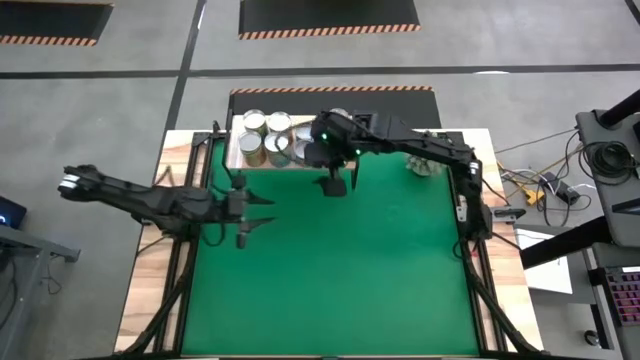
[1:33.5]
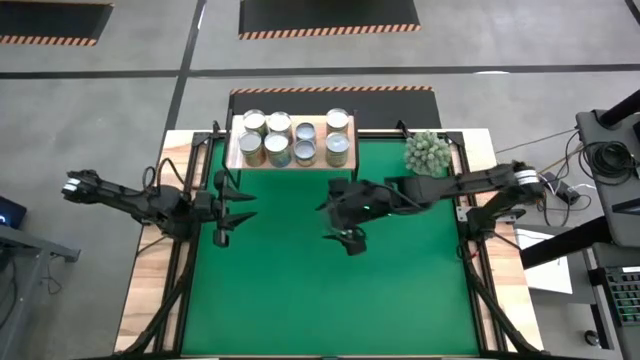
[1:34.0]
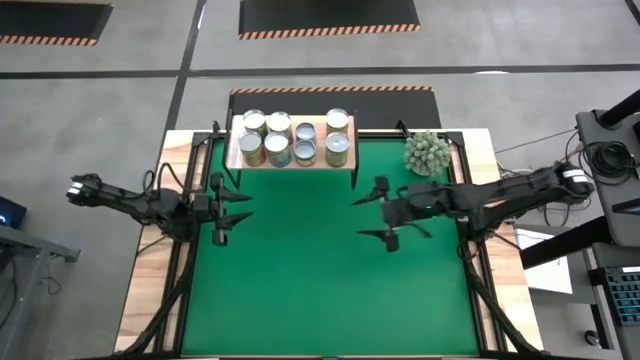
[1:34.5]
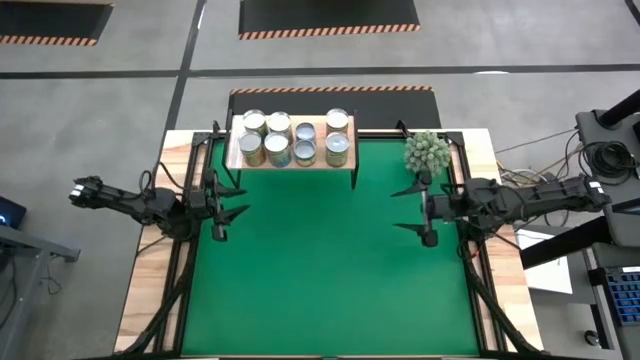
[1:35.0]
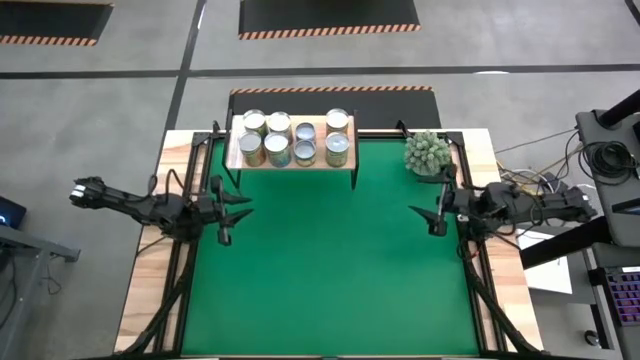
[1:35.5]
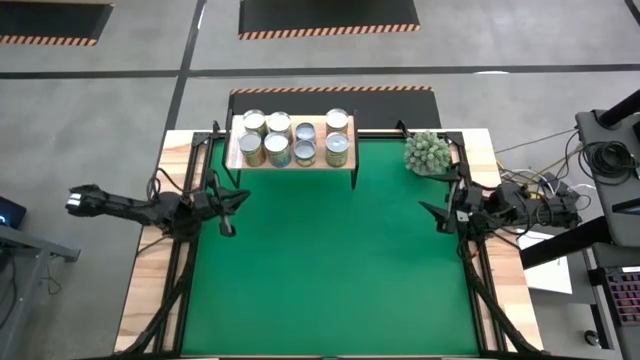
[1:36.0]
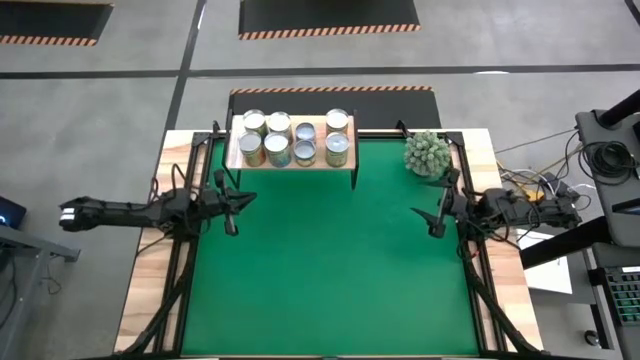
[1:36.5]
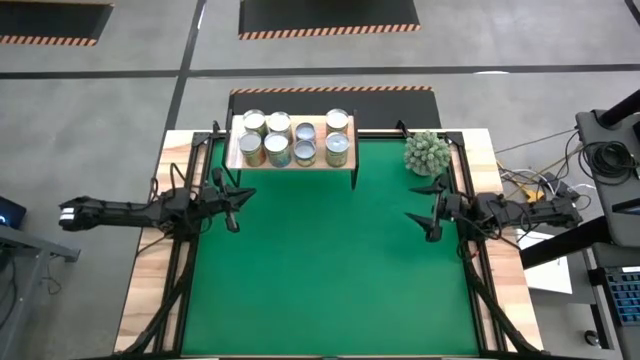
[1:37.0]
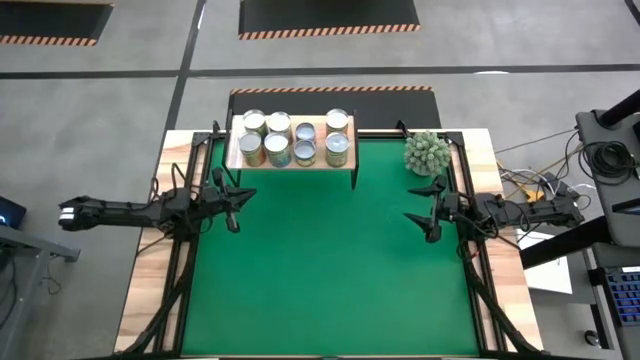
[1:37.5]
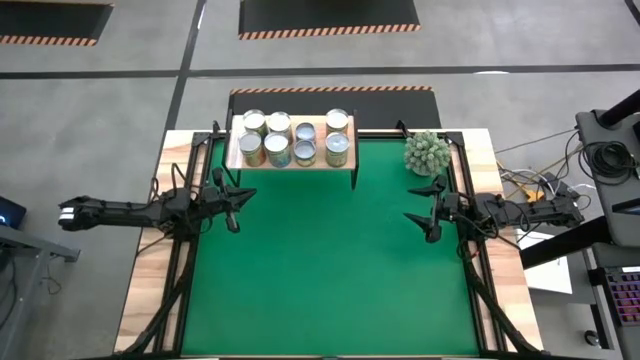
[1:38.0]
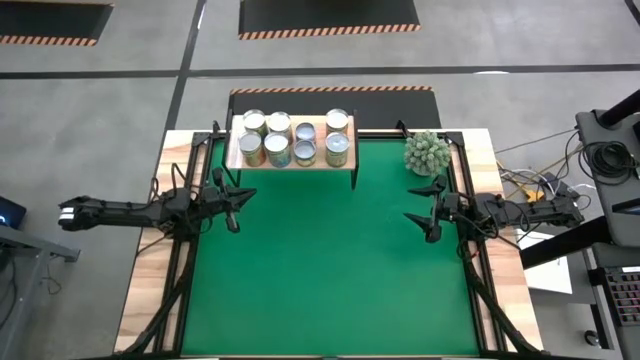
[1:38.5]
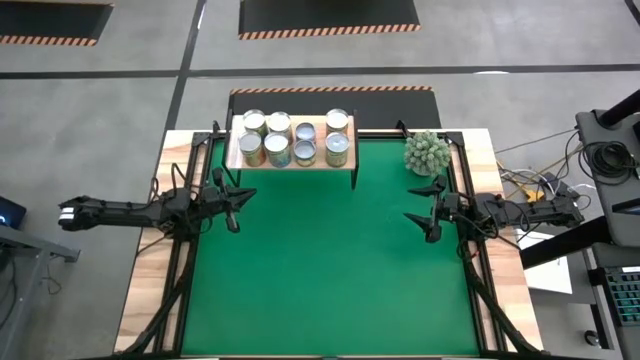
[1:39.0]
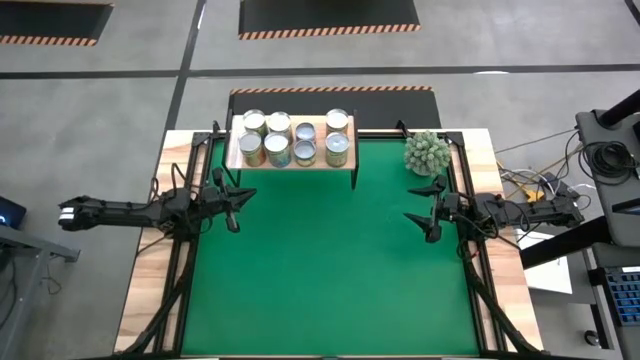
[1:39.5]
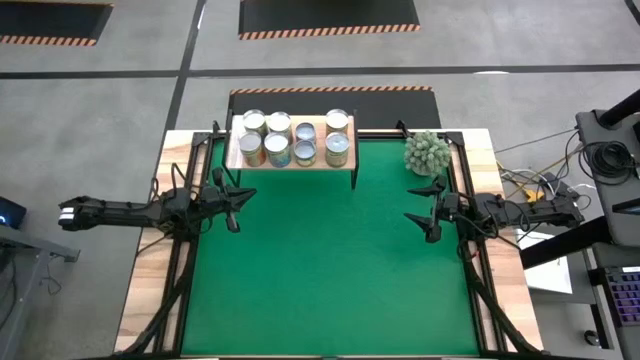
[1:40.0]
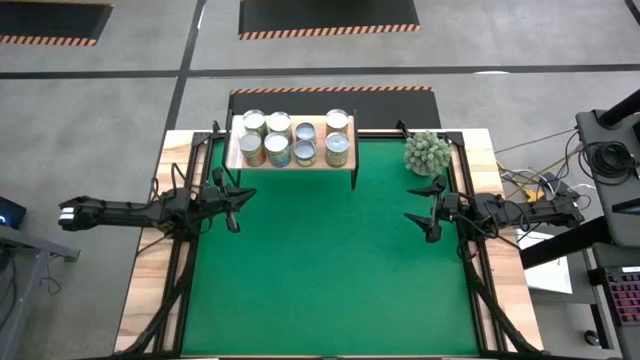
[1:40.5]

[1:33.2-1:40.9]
Task: Pick and place cans onto a shelf
Return to Home Position

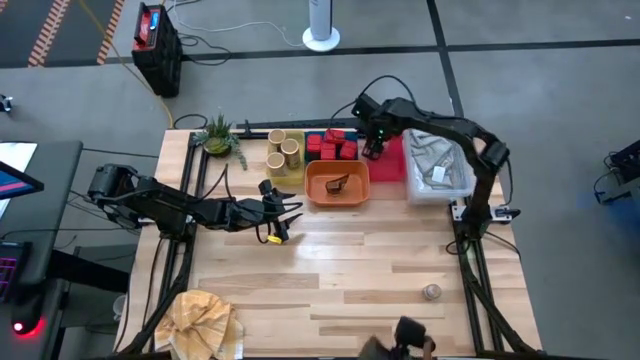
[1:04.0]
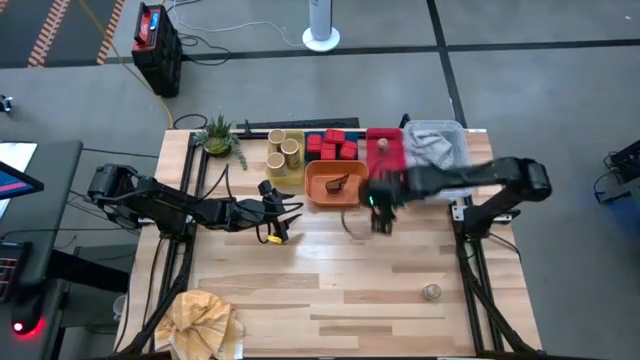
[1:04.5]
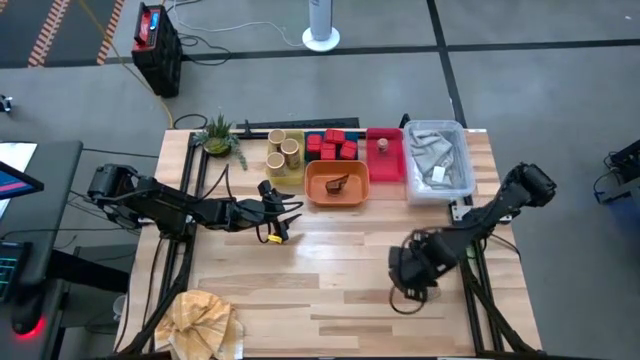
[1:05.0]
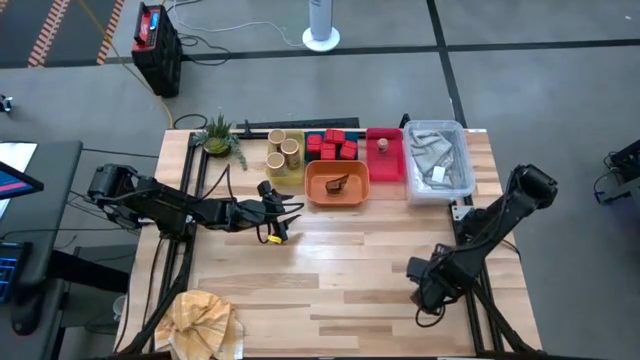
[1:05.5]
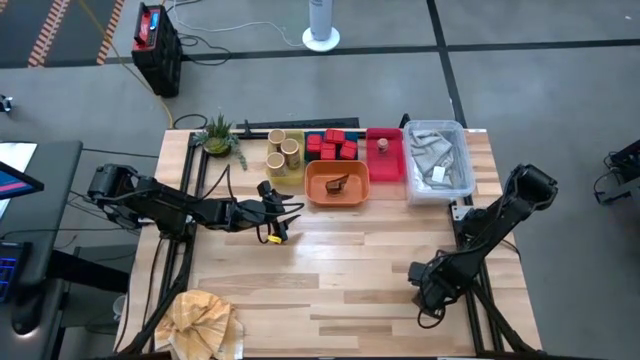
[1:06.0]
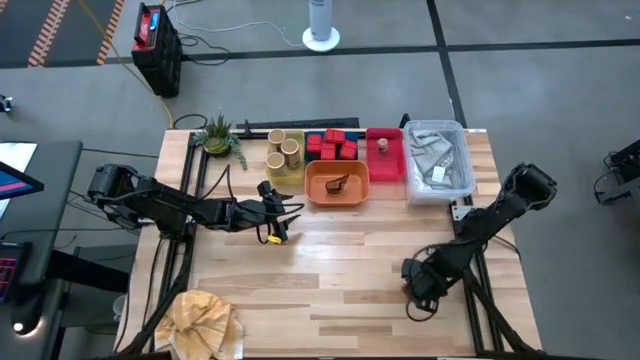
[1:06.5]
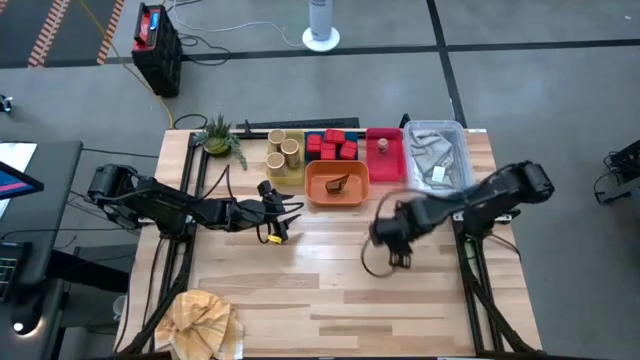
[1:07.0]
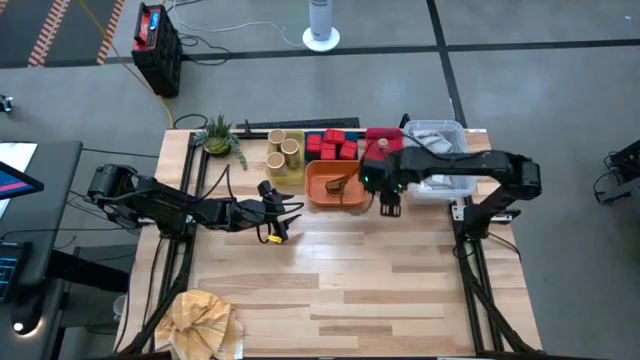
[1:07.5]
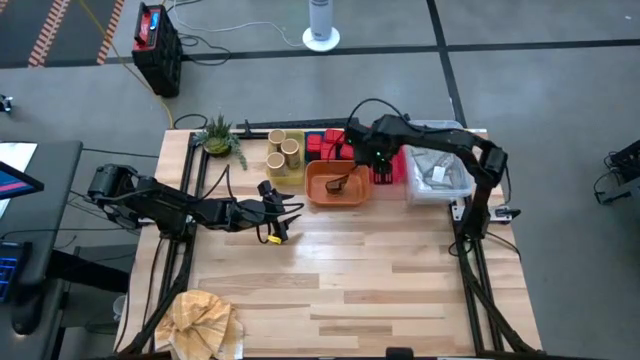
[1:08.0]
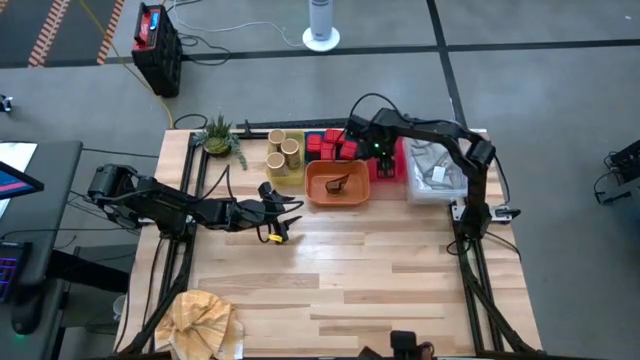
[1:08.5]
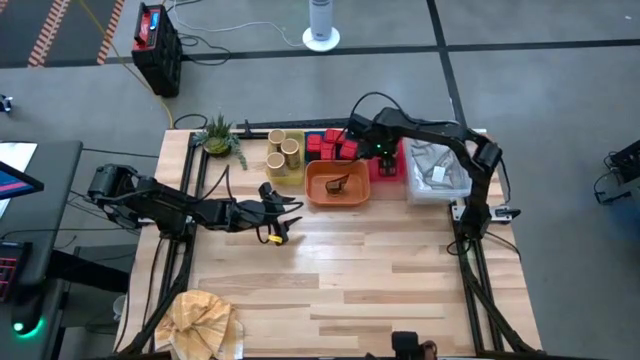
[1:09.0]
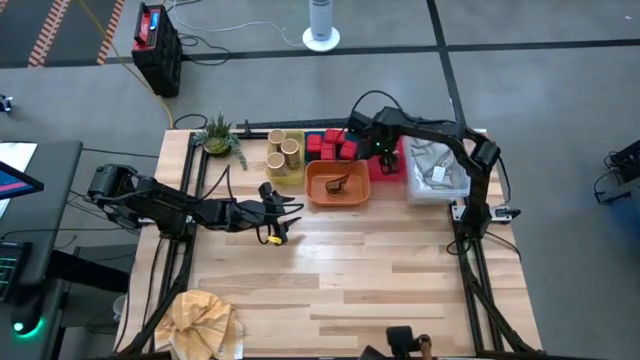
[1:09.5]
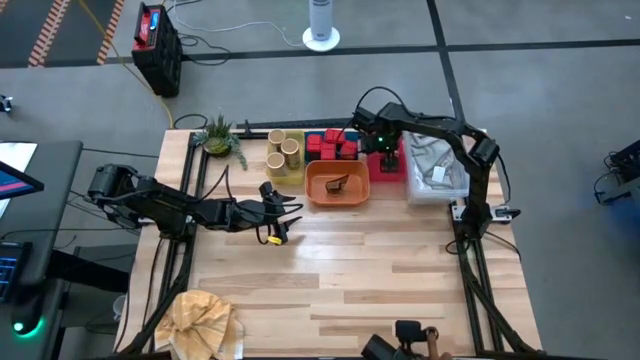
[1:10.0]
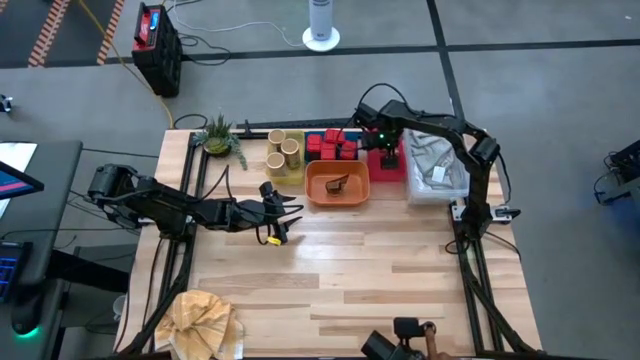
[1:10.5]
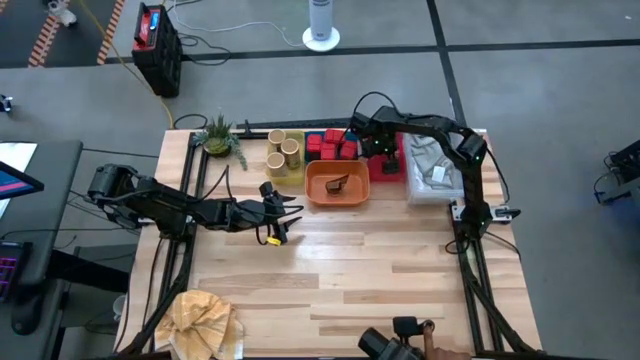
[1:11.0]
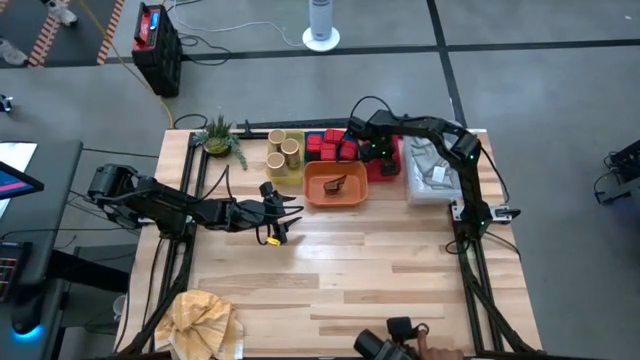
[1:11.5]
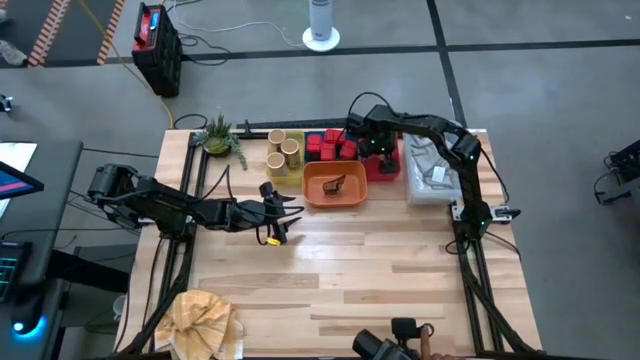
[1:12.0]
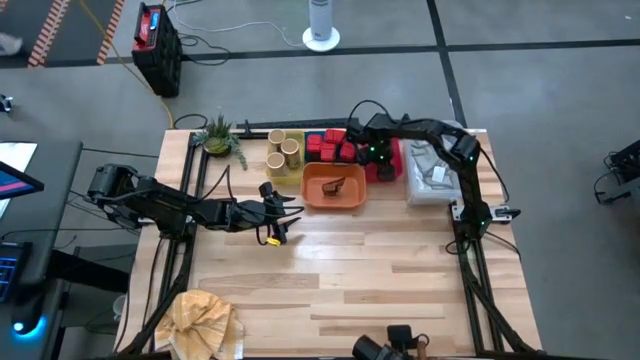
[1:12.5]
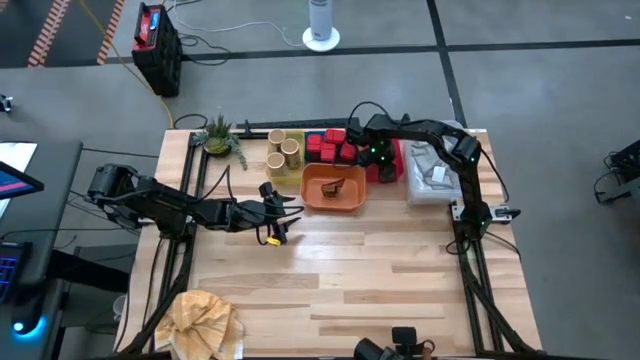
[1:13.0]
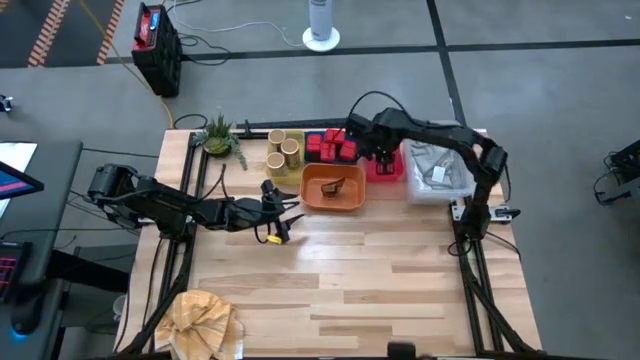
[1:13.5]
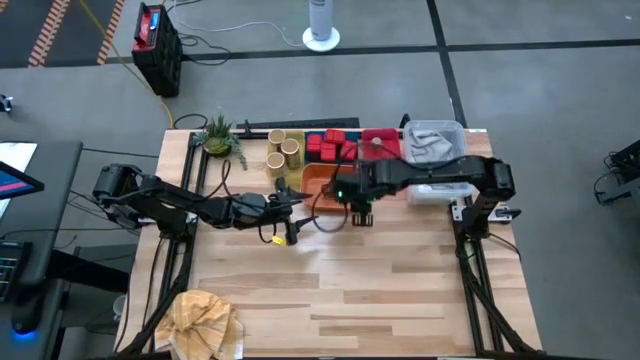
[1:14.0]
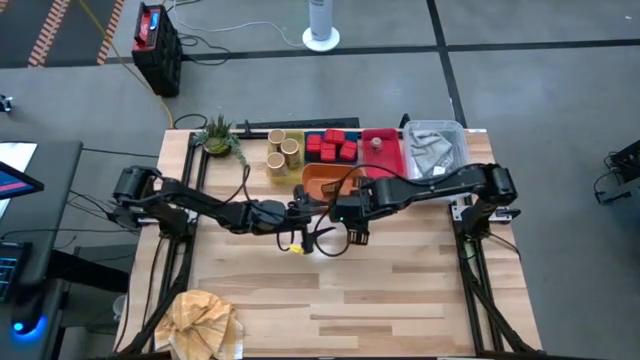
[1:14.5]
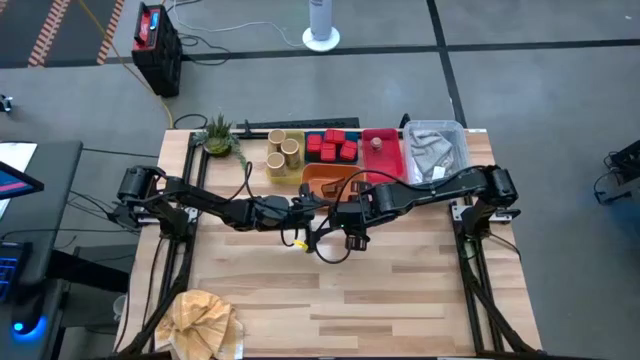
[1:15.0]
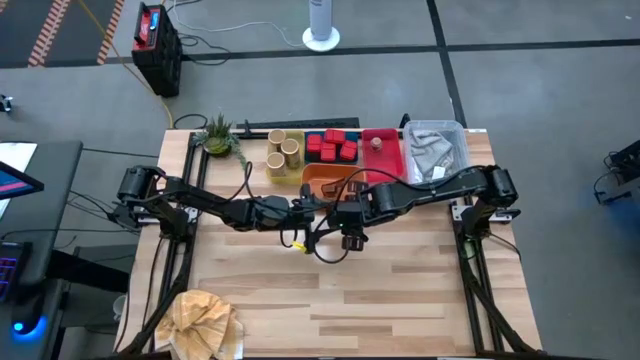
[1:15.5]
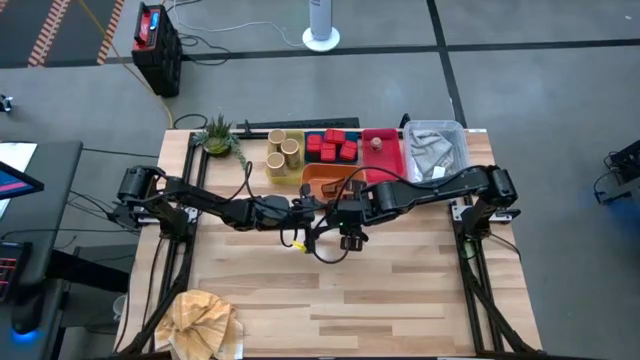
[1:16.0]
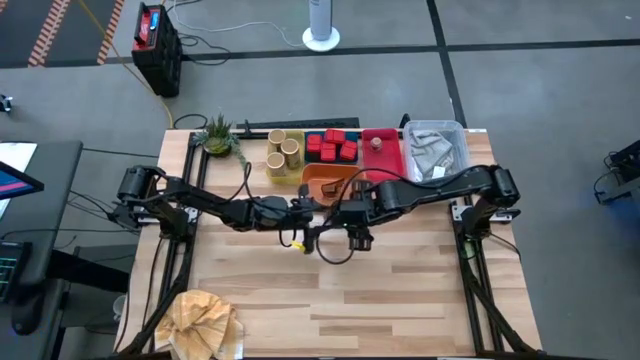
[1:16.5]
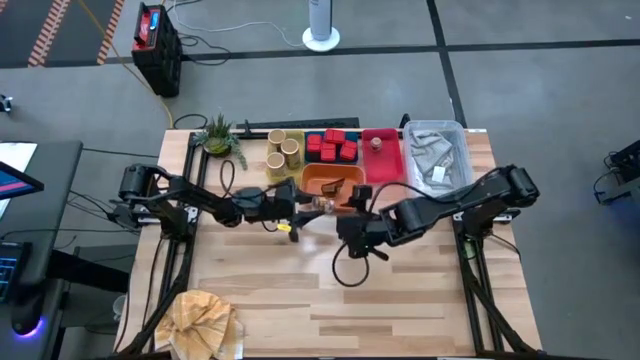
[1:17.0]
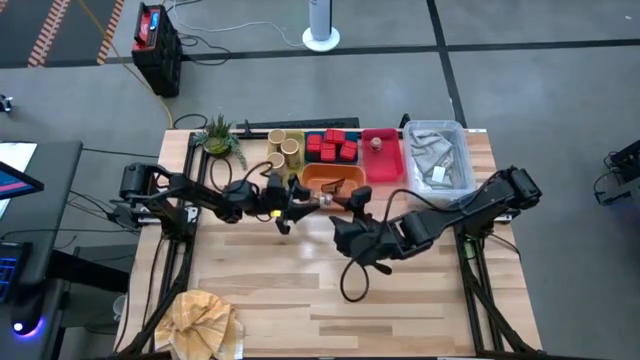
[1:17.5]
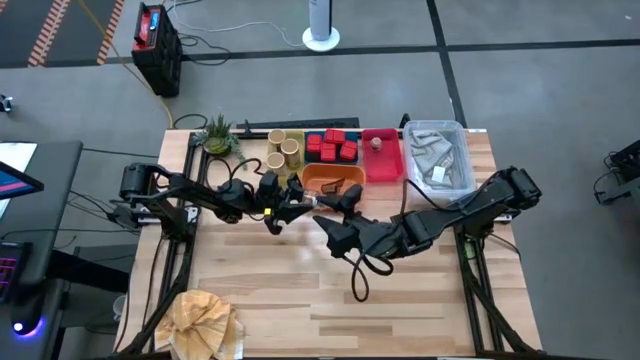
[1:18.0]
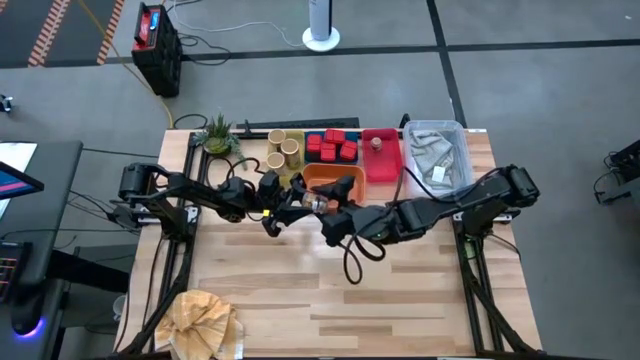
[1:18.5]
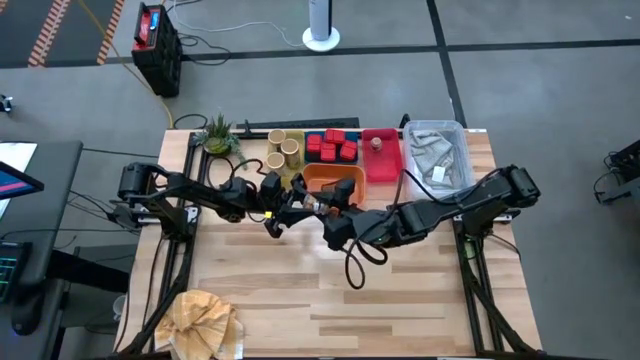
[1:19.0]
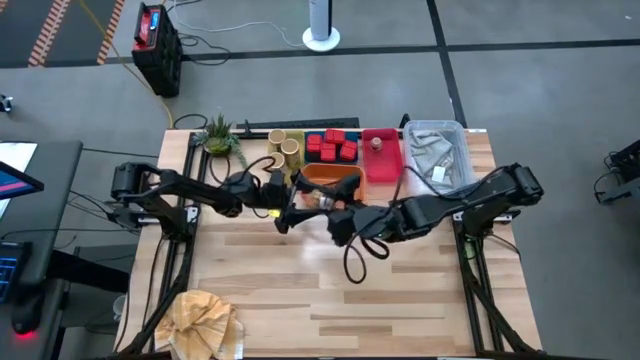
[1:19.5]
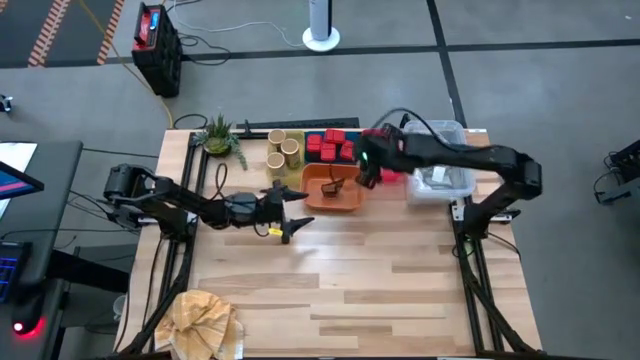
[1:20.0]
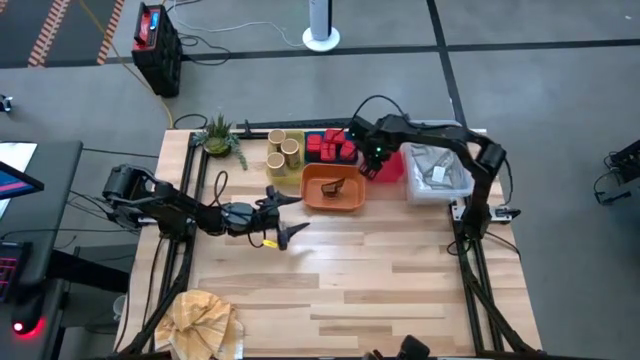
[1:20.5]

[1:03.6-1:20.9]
Task: Sort spices by type
Put the right brown seasoning bottle into the pink bin
